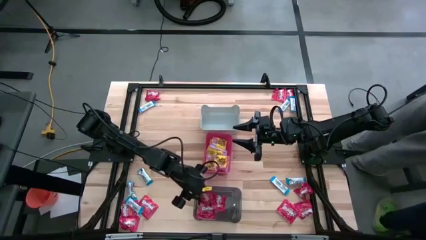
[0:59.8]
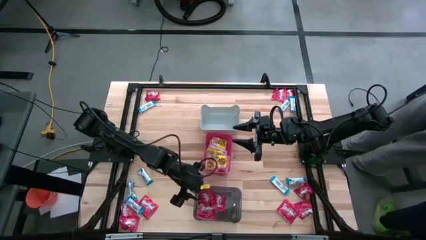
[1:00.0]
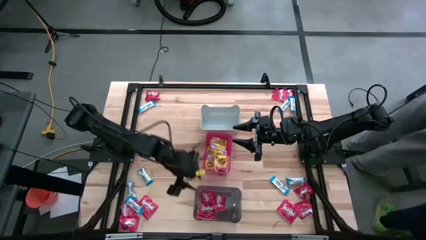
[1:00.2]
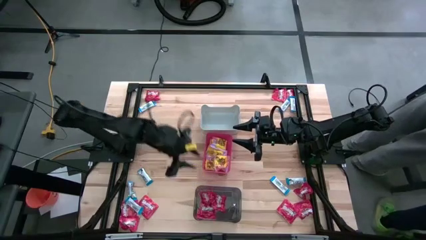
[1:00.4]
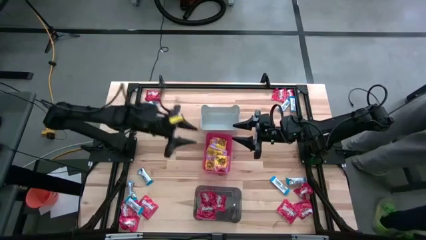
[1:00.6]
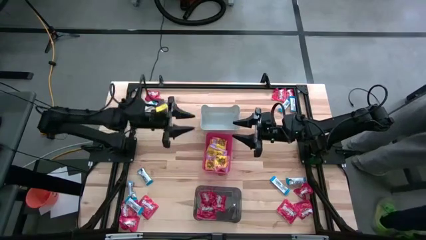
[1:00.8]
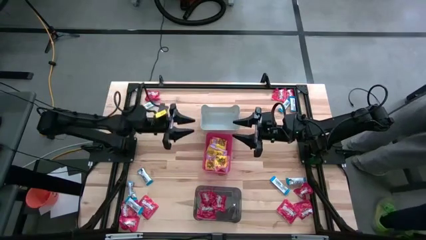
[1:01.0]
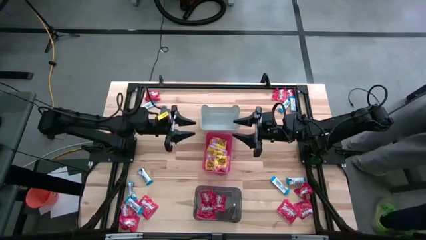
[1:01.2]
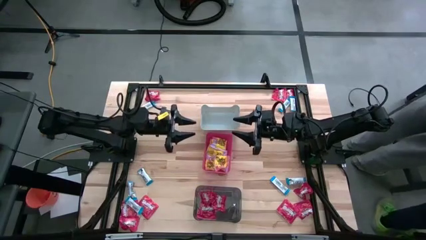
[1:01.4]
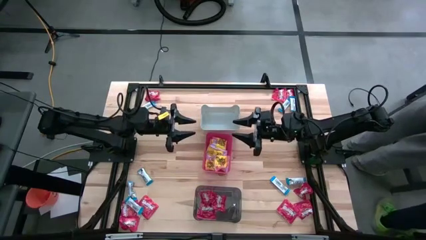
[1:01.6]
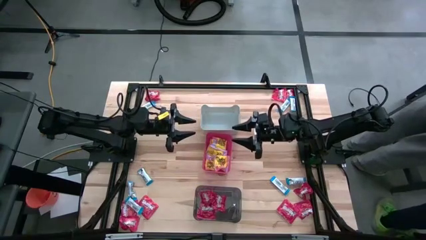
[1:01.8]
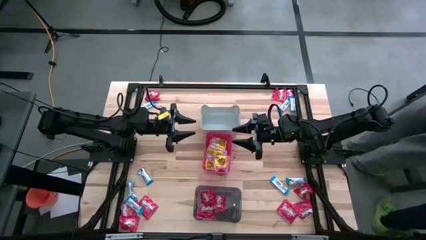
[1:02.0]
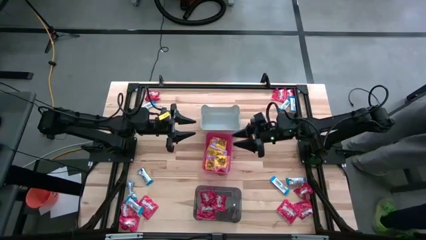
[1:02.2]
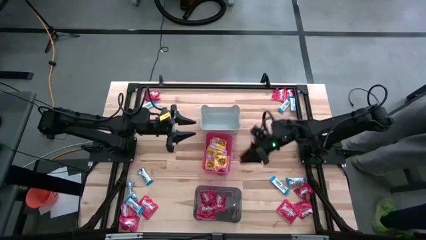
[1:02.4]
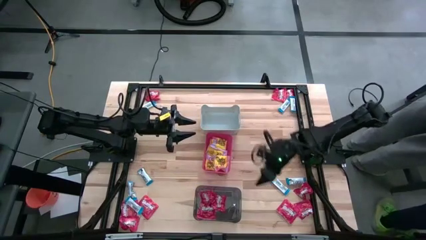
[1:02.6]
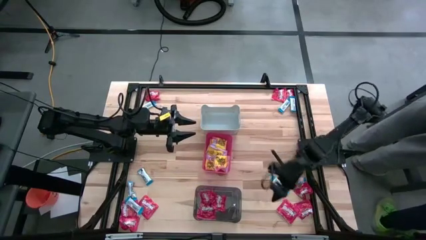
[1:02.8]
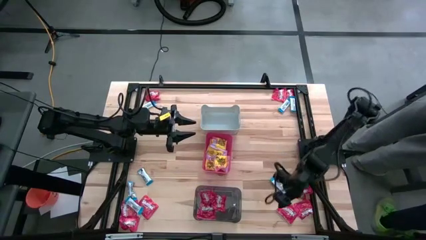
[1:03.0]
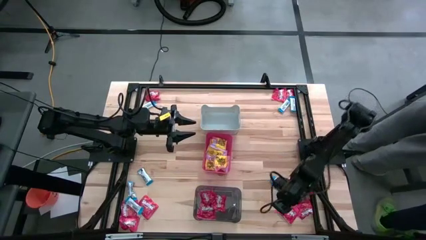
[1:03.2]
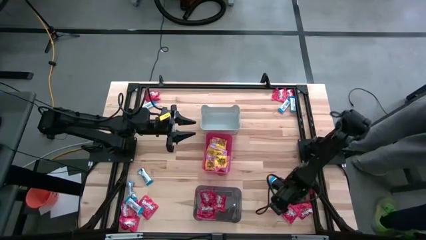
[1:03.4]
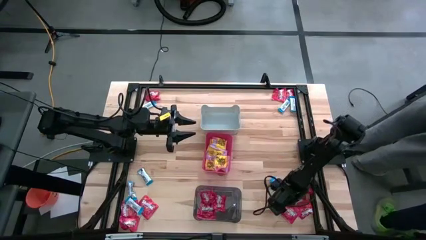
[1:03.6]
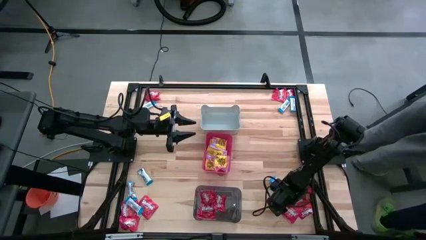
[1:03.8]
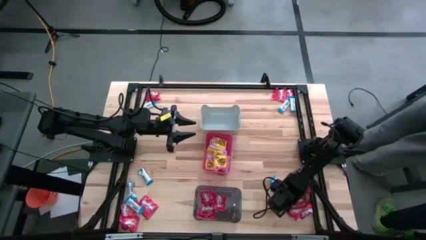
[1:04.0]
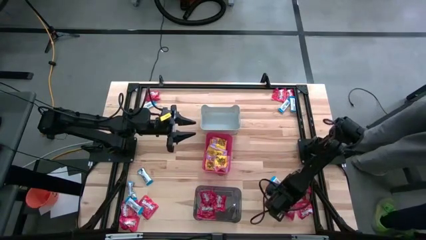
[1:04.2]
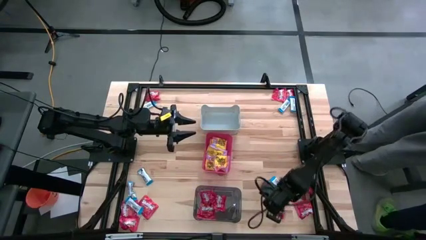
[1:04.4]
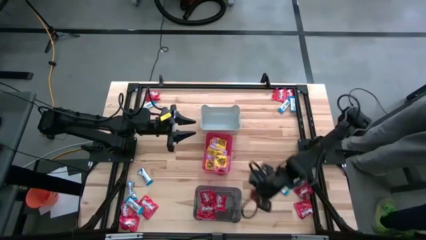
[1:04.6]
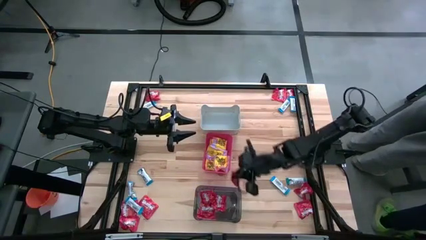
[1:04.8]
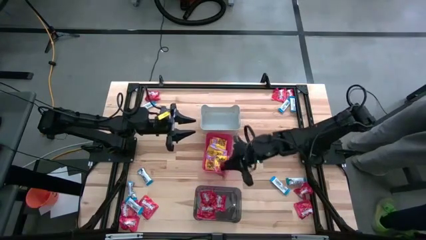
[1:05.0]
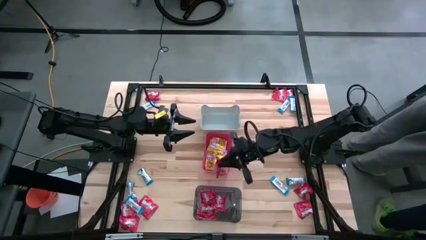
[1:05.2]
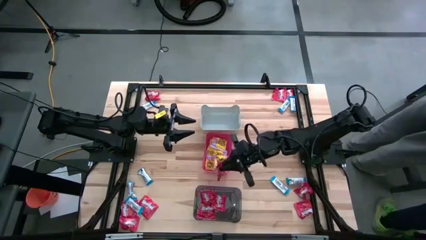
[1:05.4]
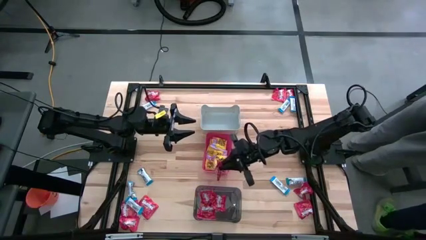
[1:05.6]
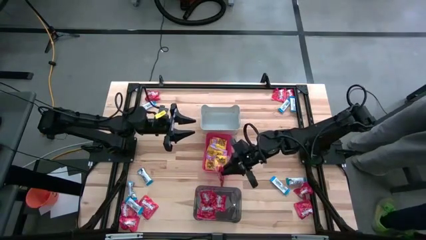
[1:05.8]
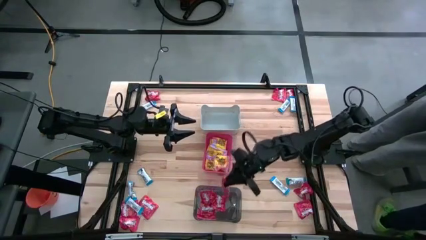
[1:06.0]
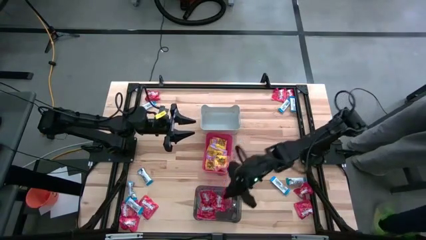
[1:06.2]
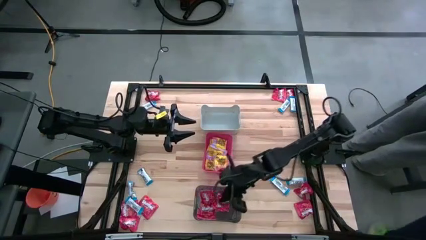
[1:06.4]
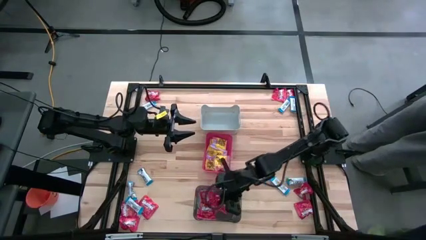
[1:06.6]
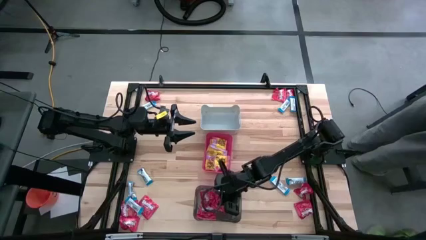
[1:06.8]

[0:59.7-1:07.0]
Task: Sort candy
Put the red candy into the black bin

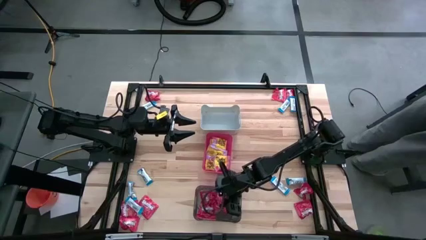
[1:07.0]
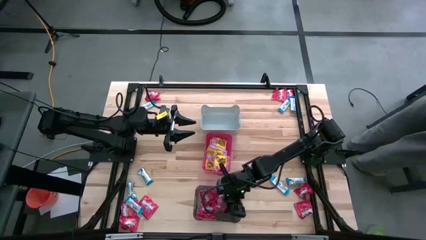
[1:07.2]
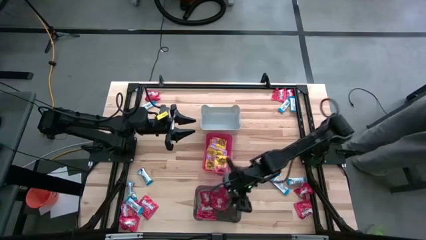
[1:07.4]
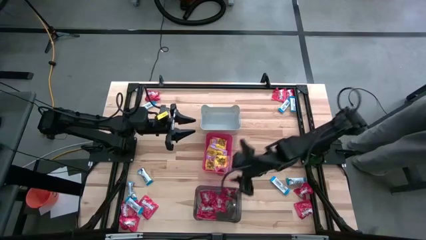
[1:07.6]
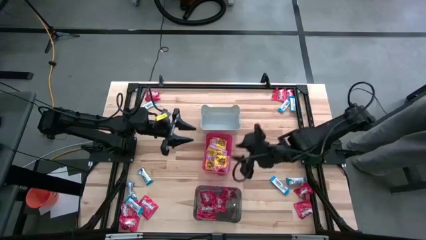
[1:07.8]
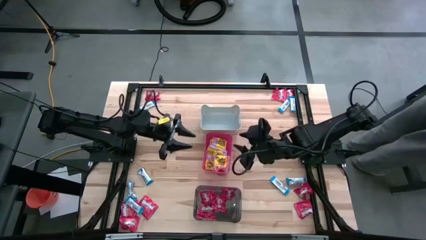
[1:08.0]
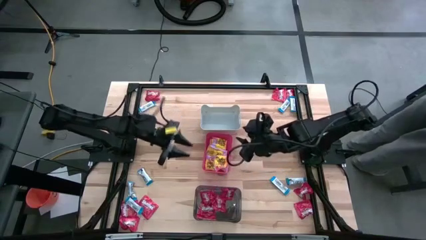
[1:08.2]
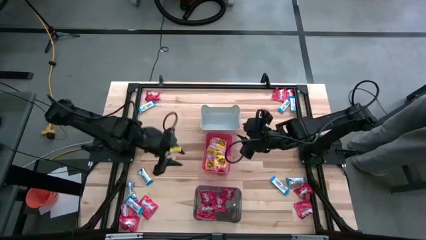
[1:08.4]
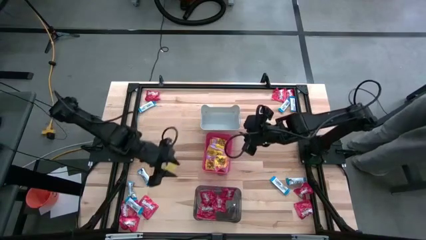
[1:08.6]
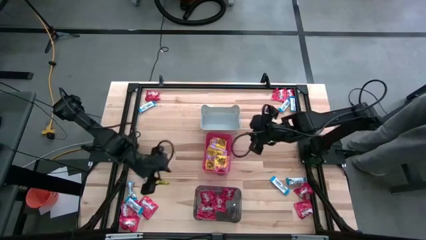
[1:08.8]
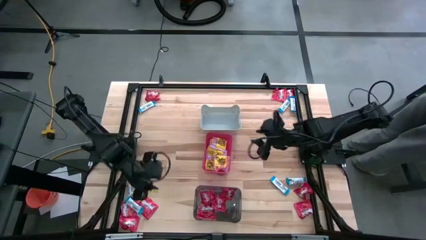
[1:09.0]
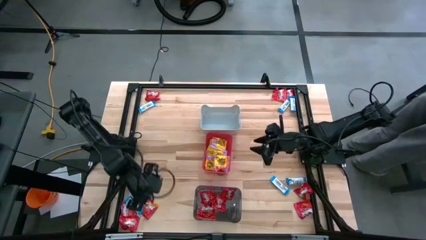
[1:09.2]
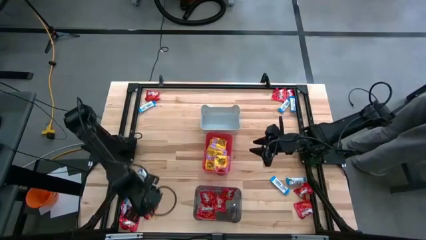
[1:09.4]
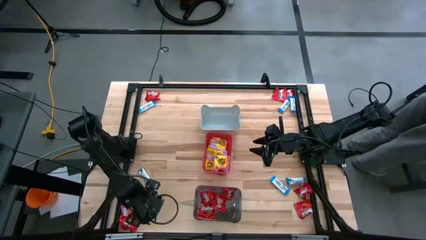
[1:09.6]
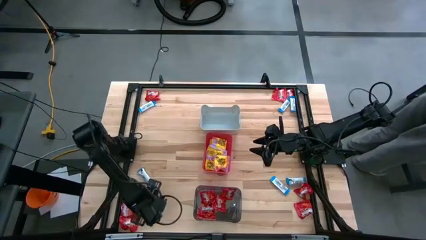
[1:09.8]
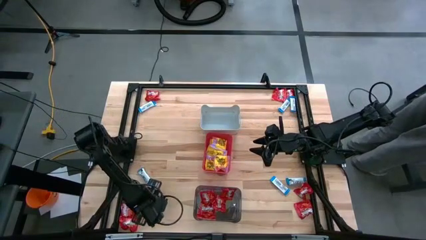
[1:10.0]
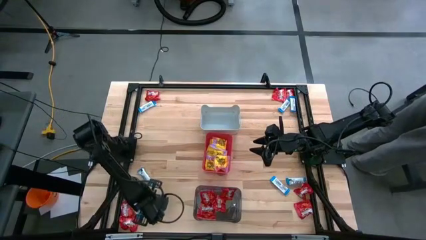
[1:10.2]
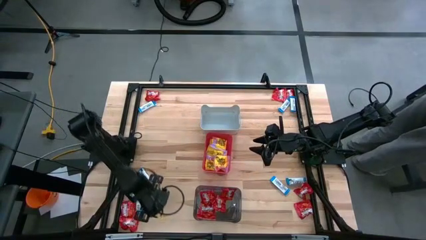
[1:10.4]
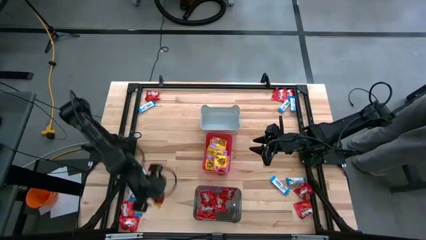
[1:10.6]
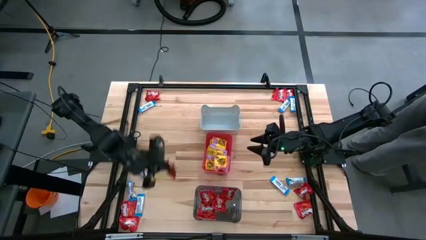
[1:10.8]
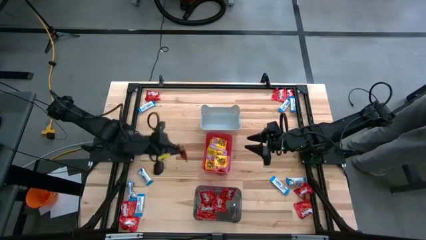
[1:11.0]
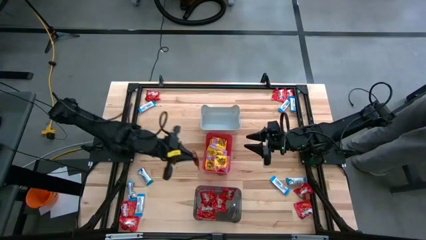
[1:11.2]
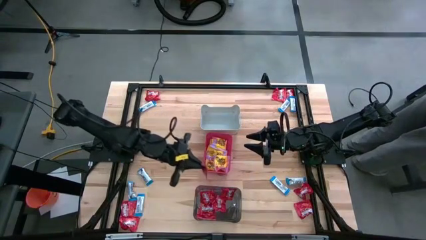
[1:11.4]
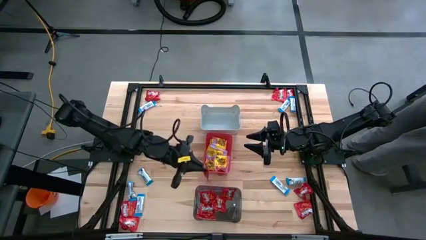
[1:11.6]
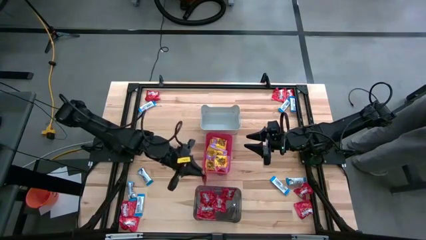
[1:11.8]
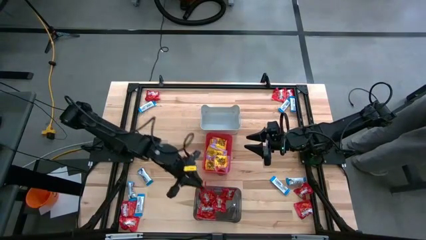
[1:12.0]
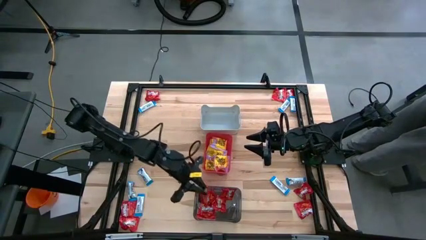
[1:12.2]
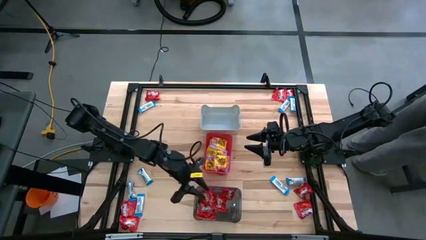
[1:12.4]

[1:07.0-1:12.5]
Put the red candy into the black bin

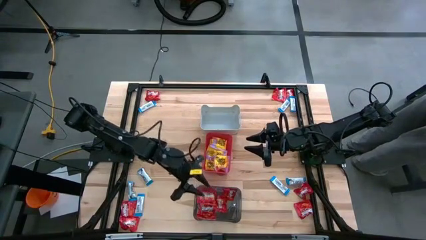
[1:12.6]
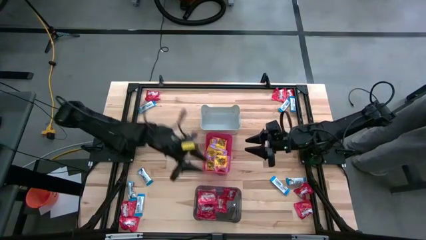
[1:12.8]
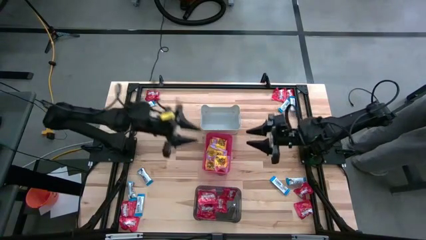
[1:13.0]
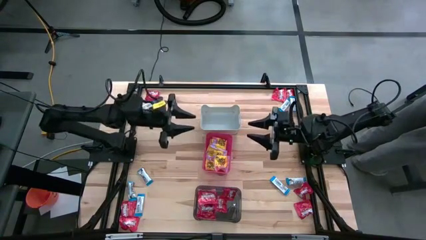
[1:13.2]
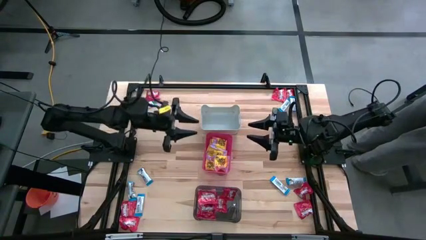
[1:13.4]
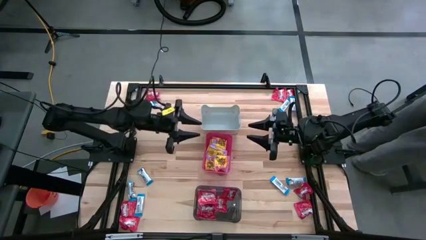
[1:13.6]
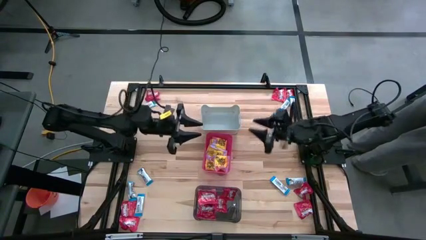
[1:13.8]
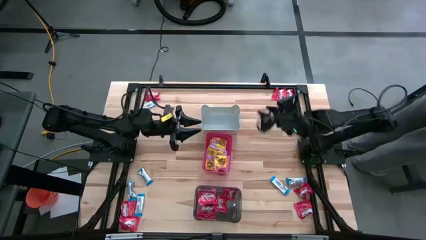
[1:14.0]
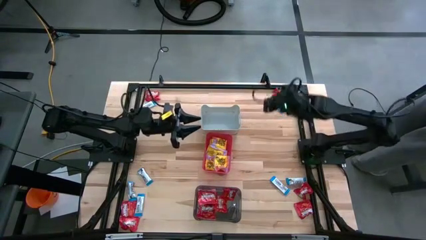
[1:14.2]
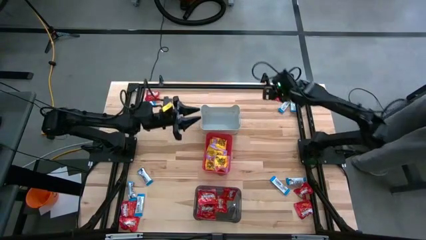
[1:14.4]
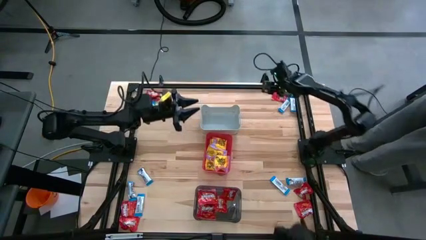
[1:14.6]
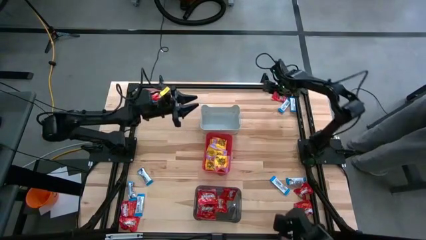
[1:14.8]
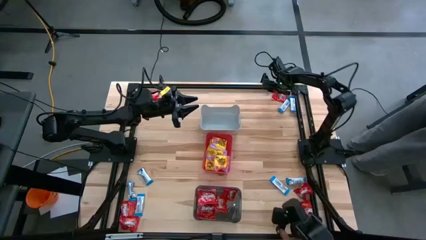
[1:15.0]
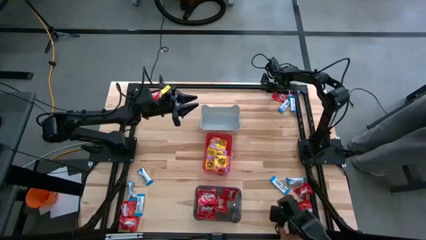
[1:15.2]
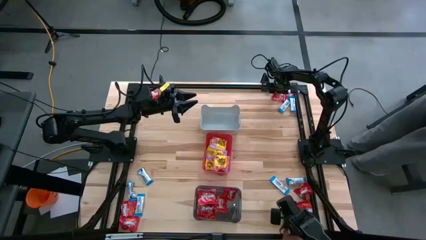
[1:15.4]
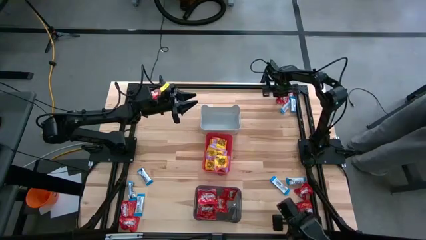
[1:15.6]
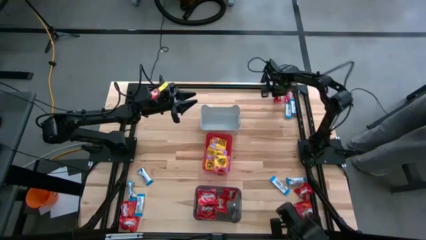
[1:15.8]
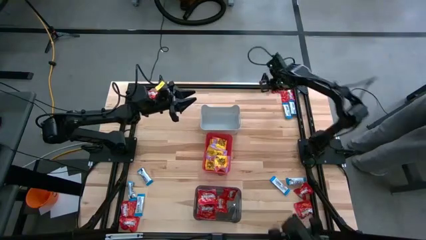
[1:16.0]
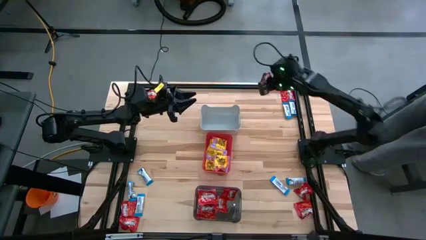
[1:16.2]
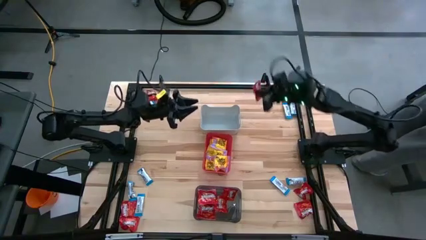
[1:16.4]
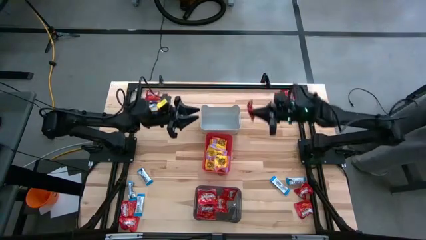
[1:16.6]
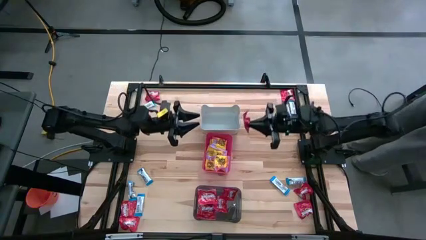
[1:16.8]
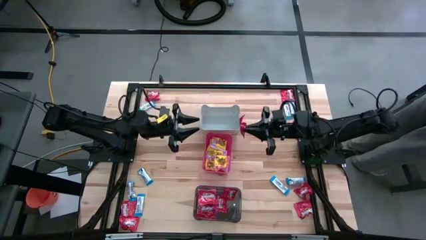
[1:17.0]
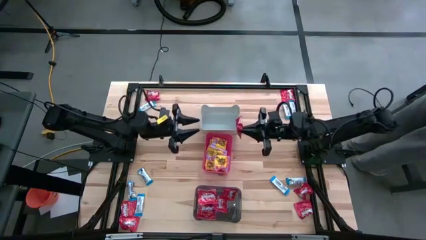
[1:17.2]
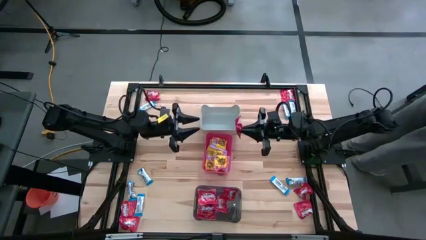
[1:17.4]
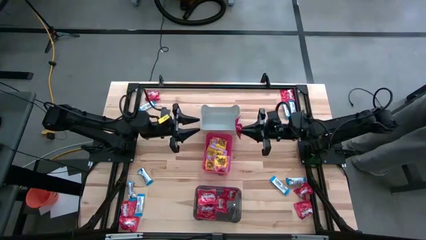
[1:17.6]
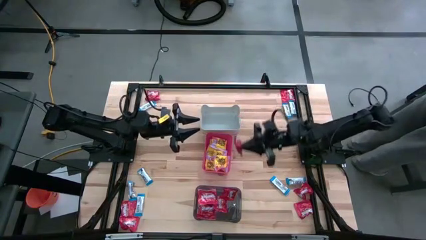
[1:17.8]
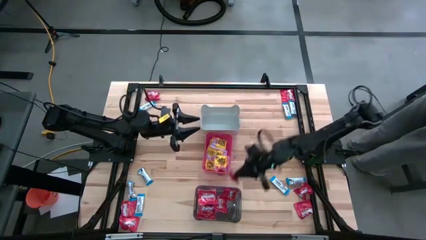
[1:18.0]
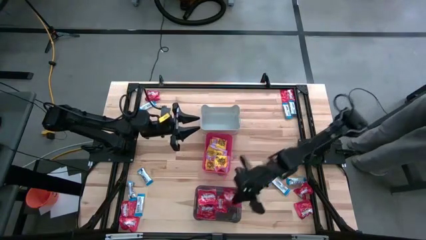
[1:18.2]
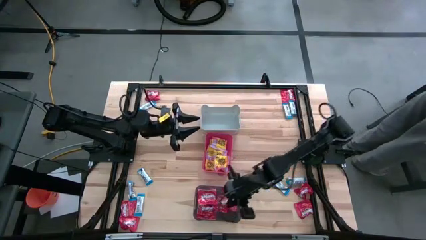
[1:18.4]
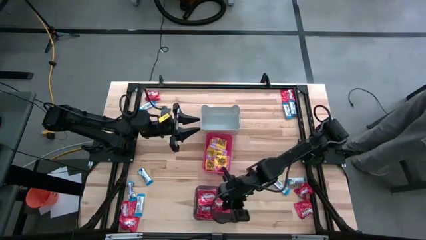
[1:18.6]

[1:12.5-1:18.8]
Put the red candy into the black bin
